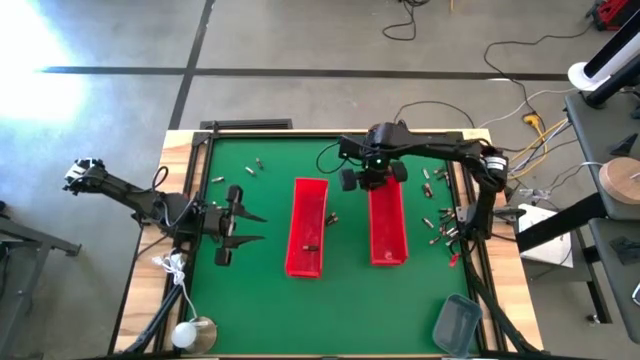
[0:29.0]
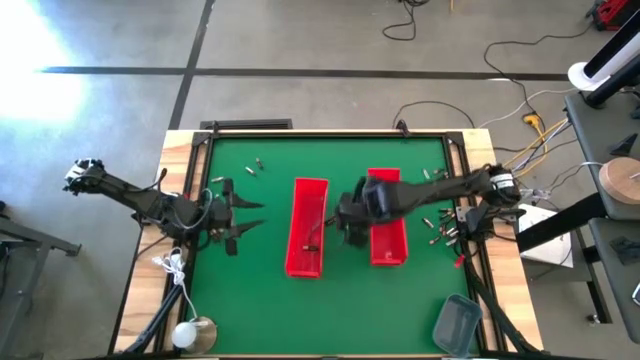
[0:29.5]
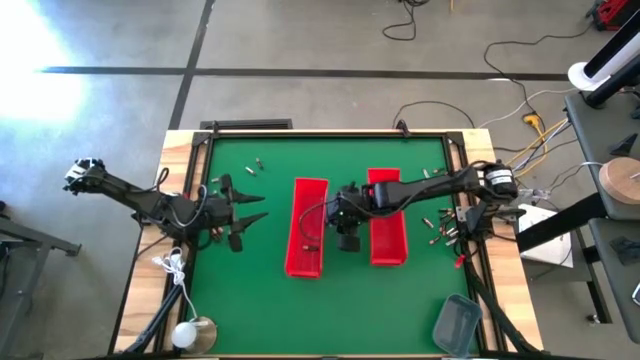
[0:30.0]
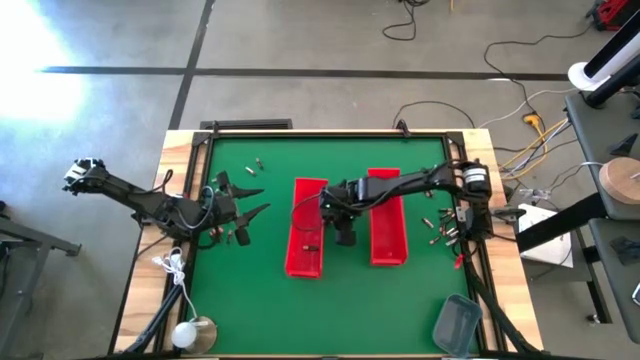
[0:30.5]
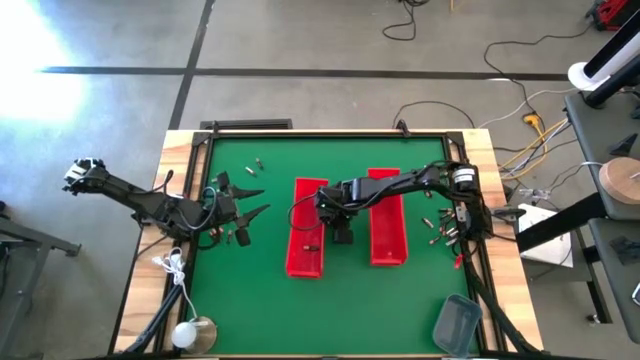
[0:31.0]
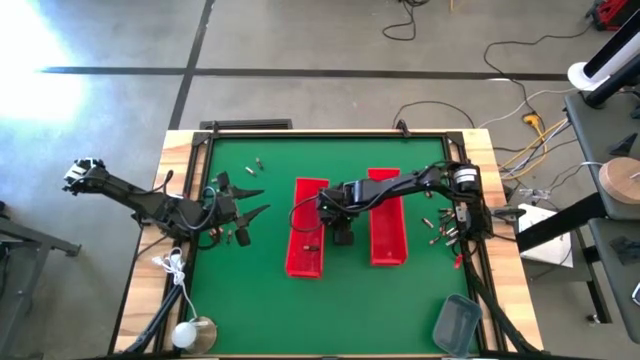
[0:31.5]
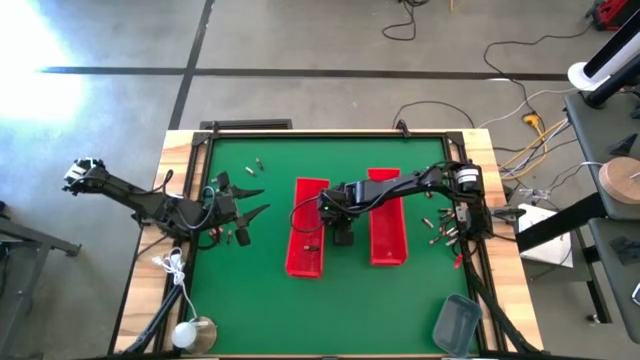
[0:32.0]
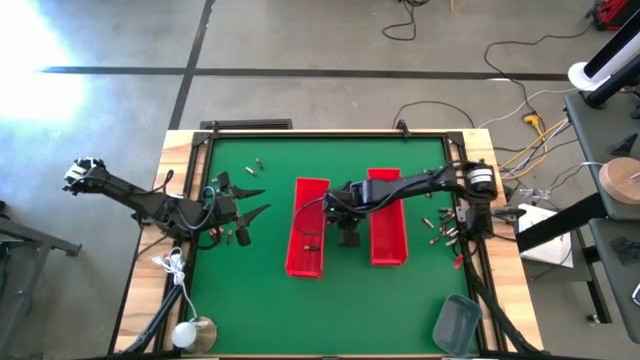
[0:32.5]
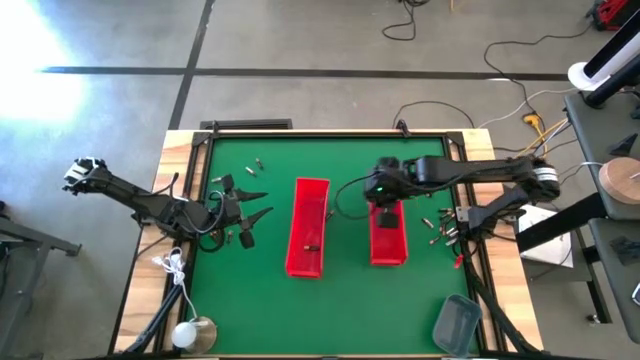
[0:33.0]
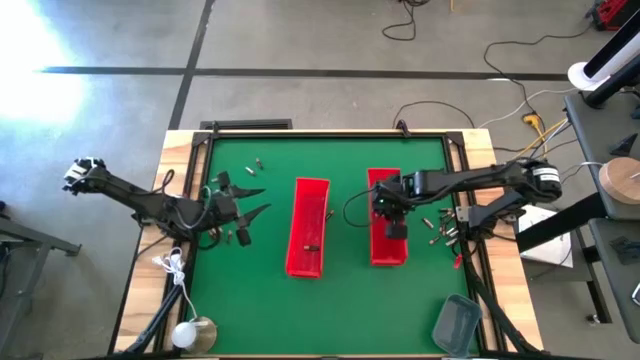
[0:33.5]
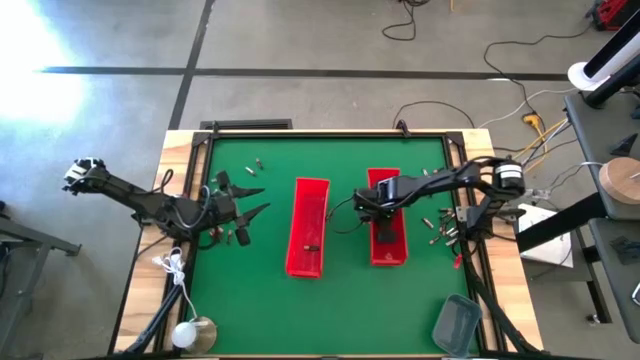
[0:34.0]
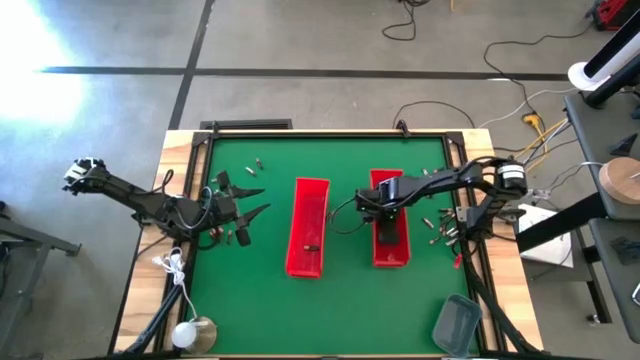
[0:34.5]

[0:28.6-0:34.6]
Task: Sort batteries
Put the small black battery into the top right red bin

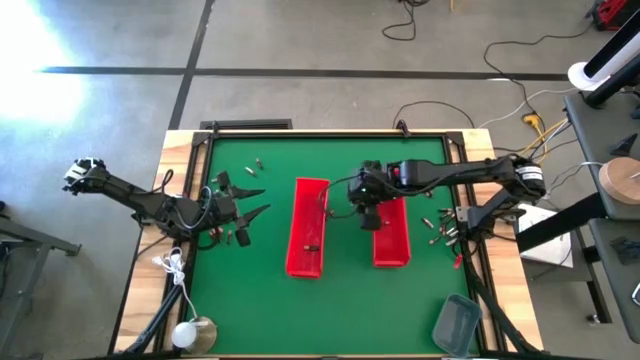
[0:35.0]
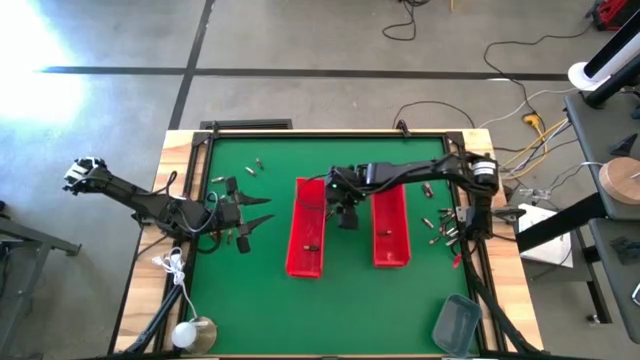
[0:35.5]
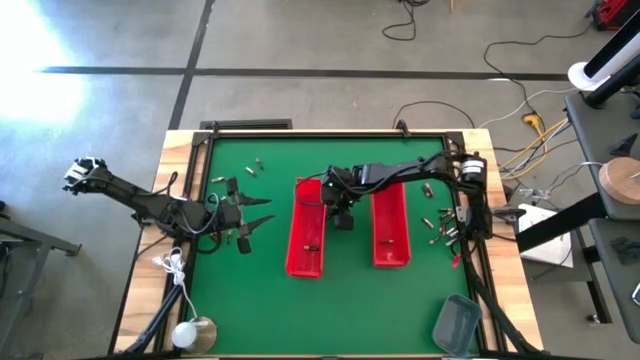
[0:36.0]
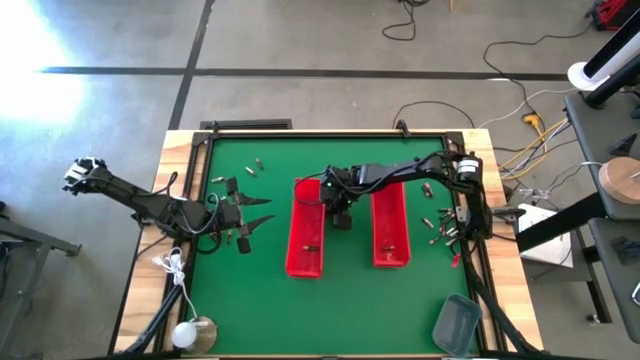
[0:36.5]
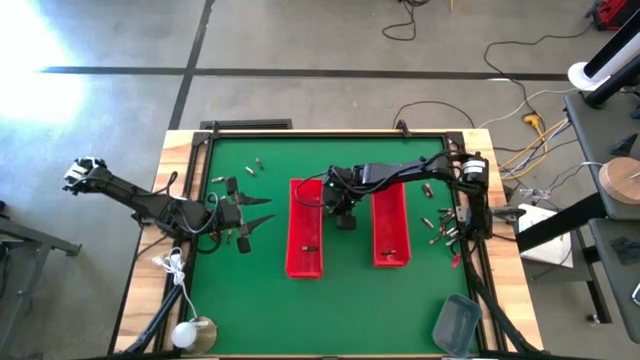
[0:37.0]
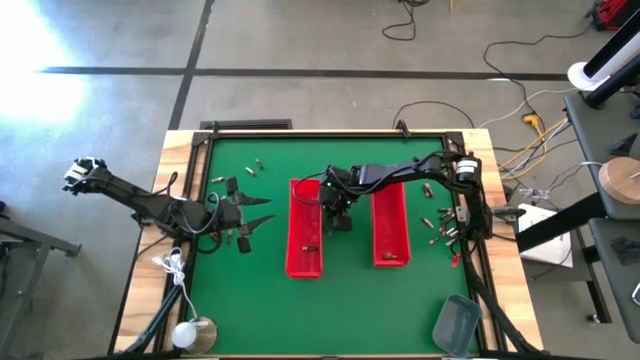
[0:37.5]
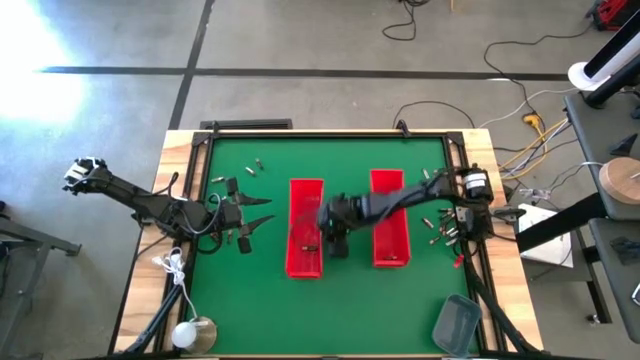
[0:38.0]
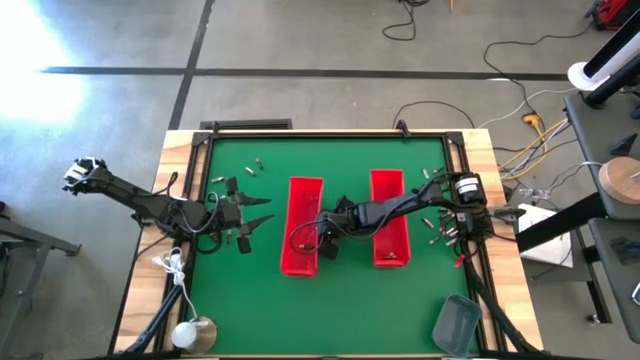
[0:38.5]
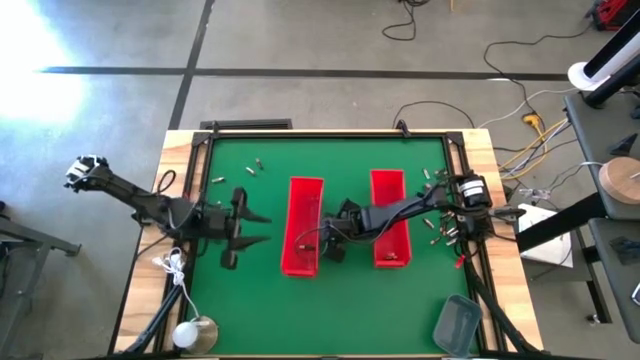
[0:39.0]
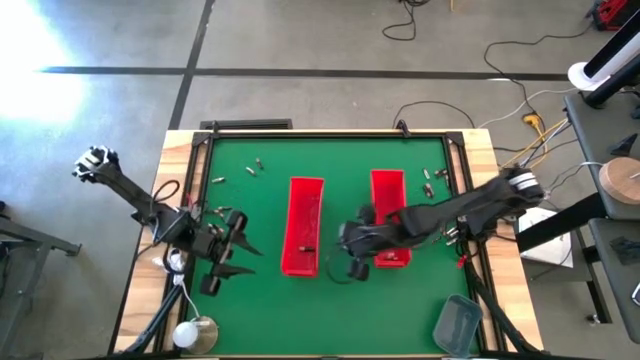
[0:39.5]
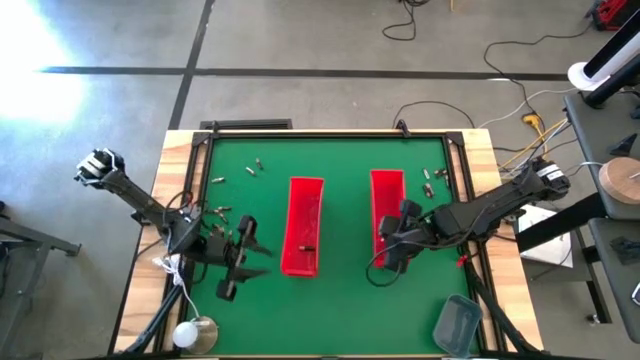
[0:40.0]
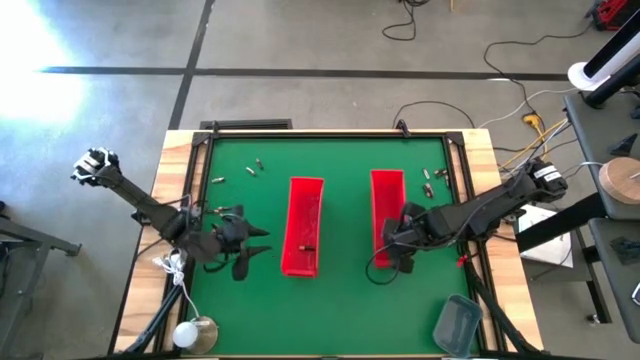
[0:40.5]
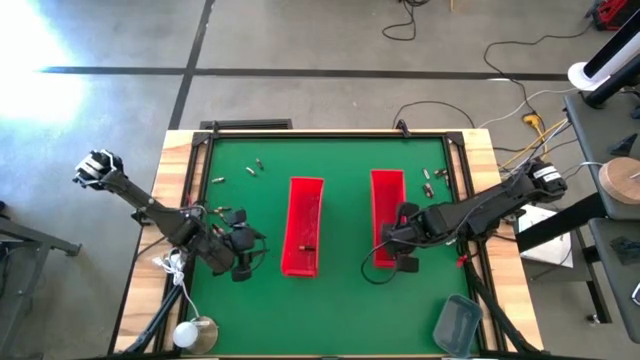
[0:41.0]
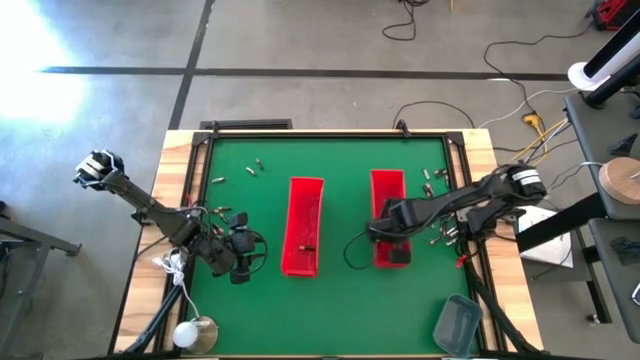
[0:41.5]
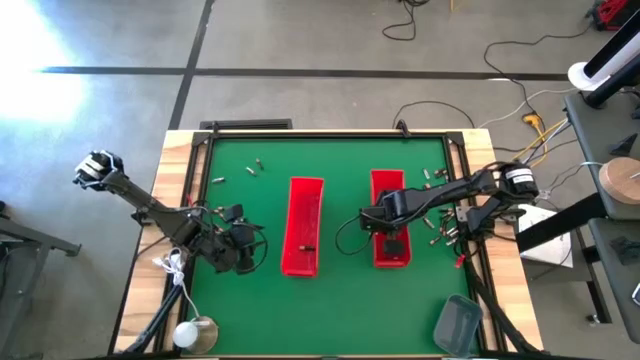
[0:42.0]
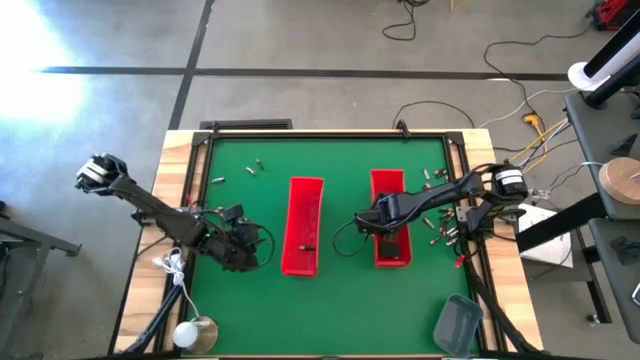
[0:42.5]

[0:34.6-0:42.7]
Put the small black battery into the top right red bin

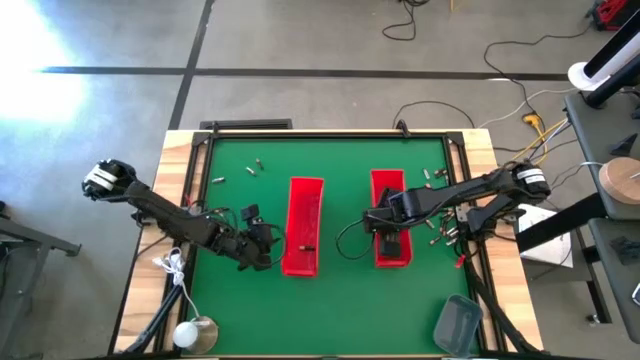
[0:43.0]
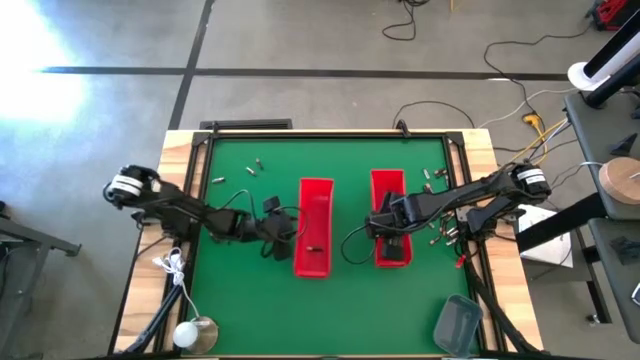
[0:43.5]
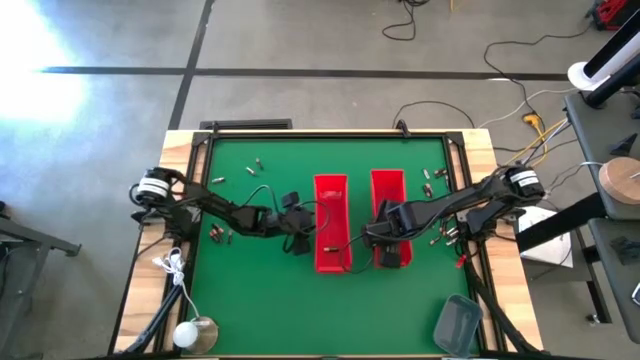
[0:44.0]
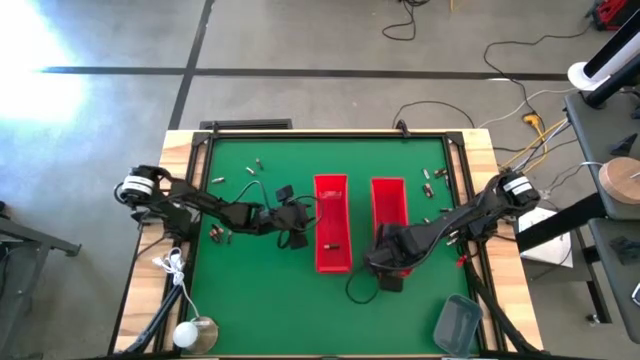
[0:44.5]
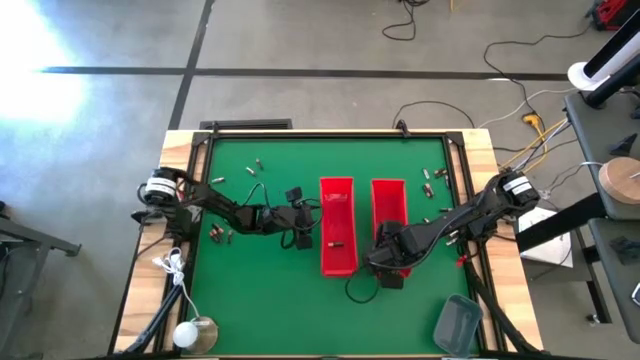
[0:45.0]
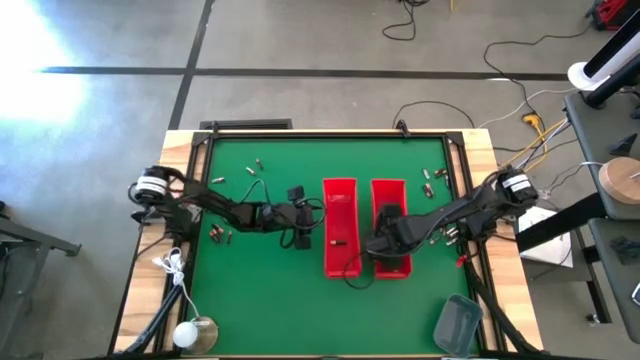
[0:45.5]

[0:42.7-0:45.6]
Adjust the left red bin on the table

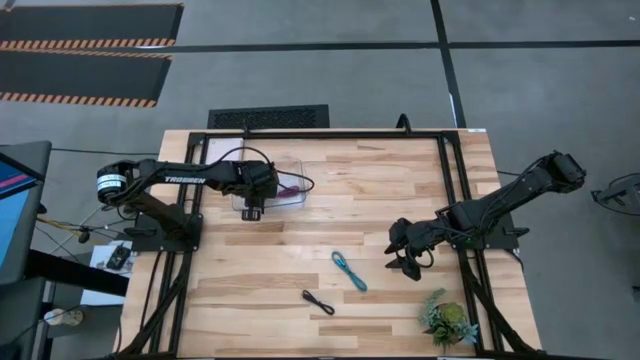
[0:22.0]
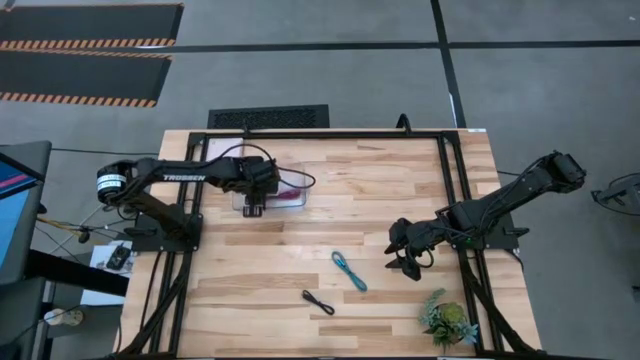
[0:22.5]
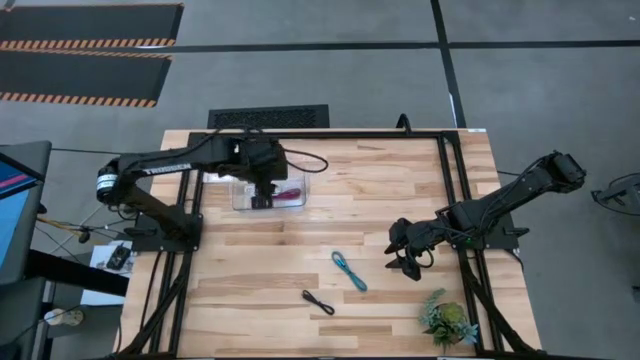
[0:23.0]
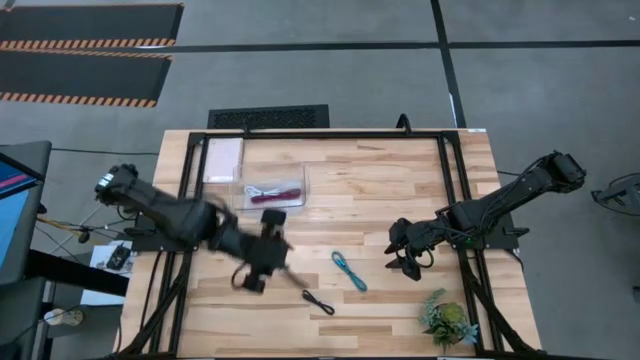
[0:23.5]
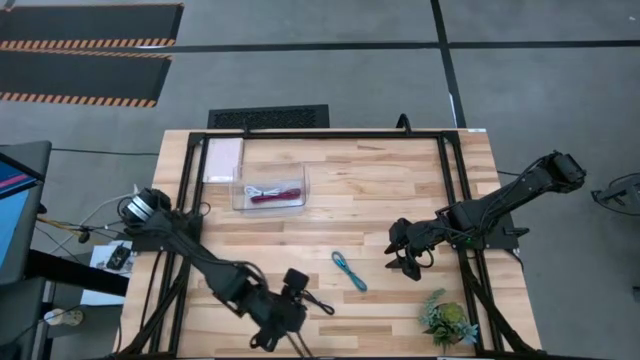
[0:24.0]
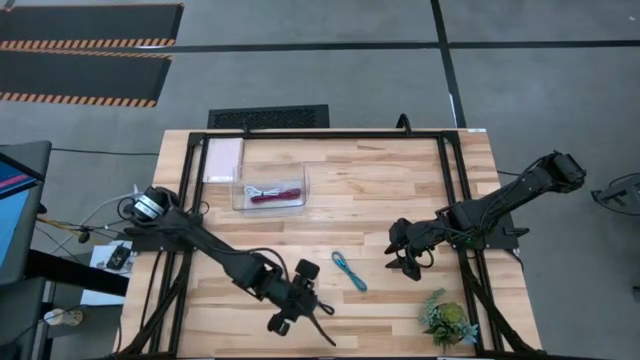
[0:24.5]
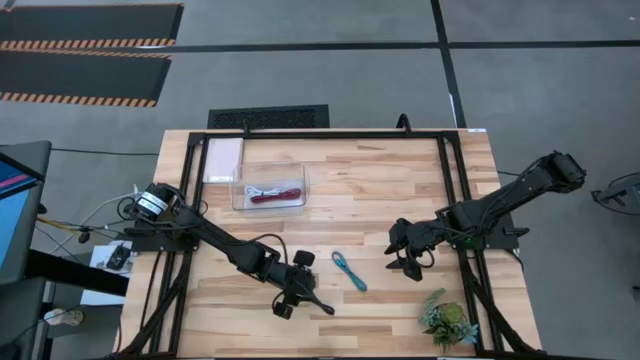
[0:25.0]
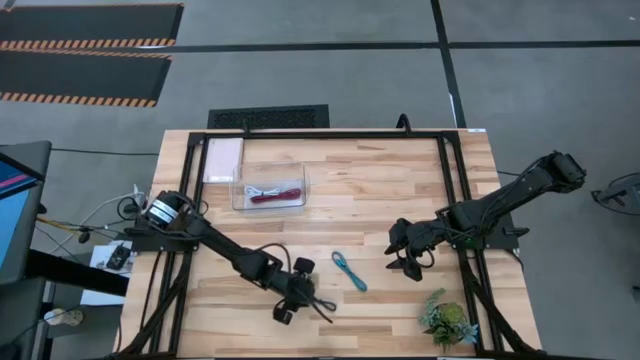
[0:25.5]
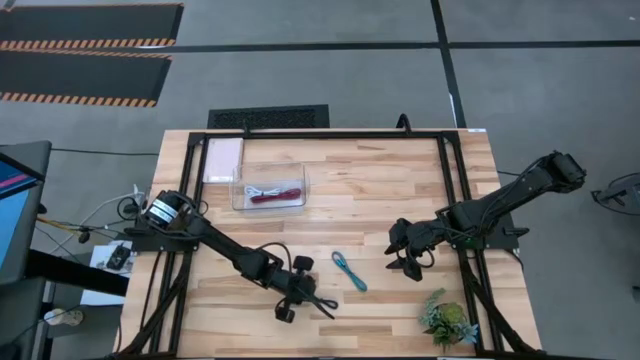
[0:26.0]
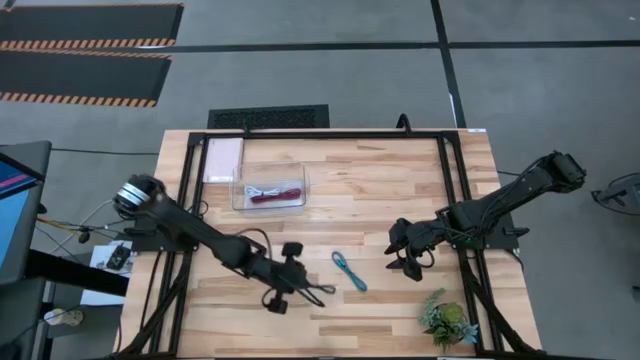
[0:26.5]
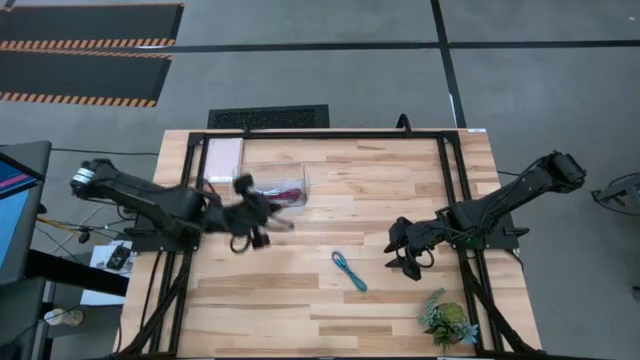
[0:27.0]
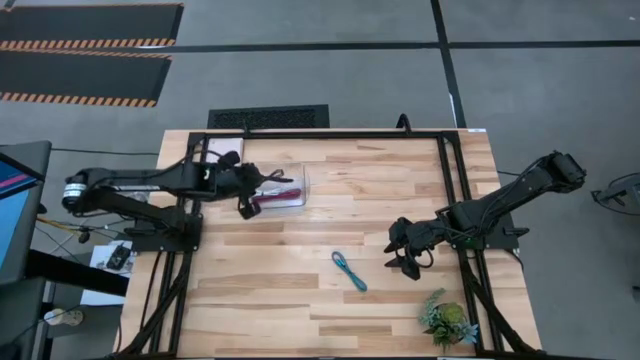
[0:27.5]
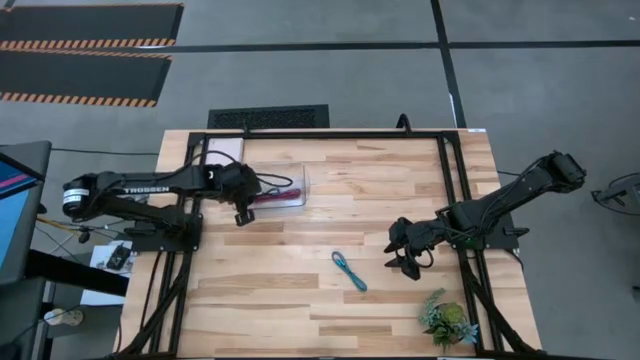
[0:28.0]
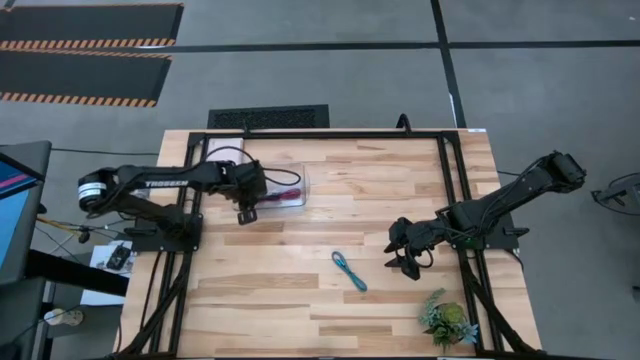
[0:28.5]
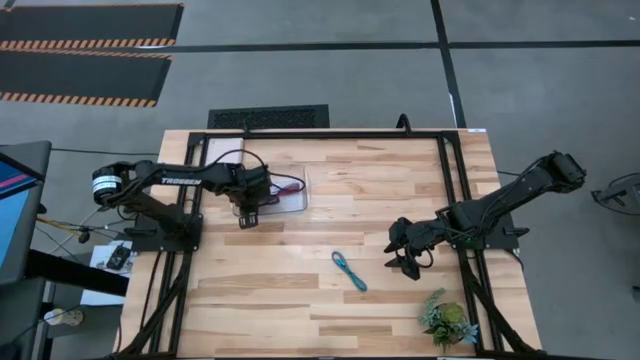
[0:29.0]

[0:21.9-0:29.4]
Task: Pick and place USB-C Cables
Put the black usb cable into the transparent bin
